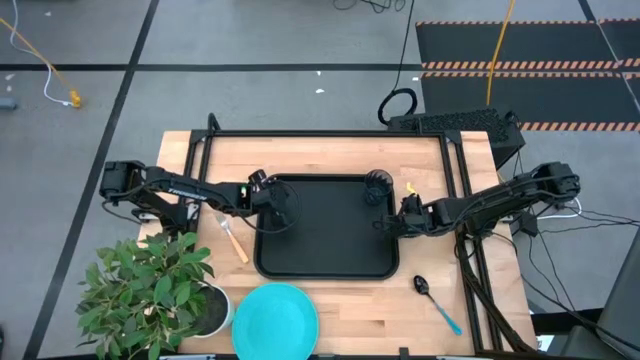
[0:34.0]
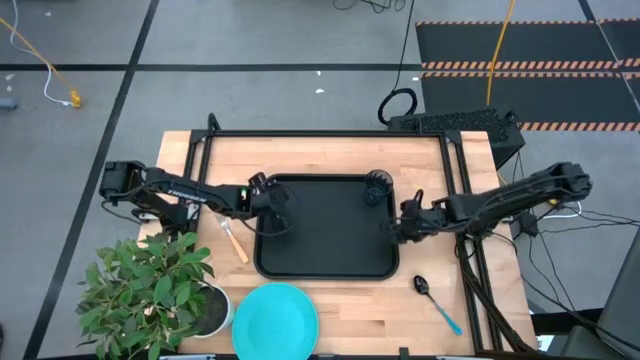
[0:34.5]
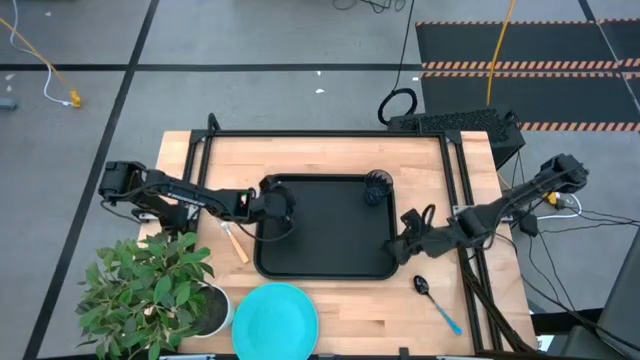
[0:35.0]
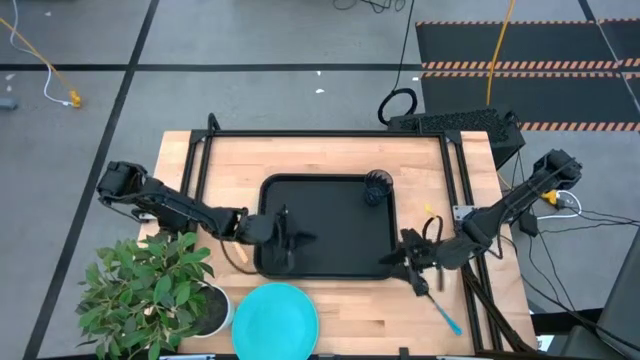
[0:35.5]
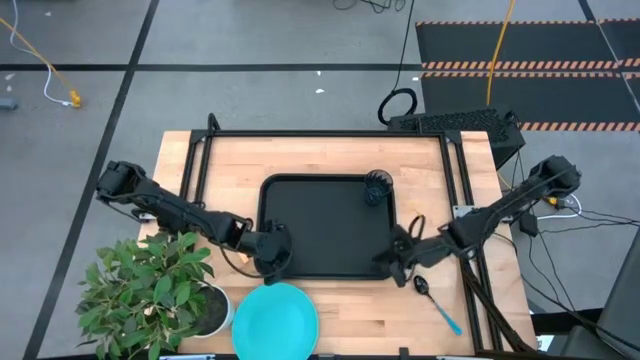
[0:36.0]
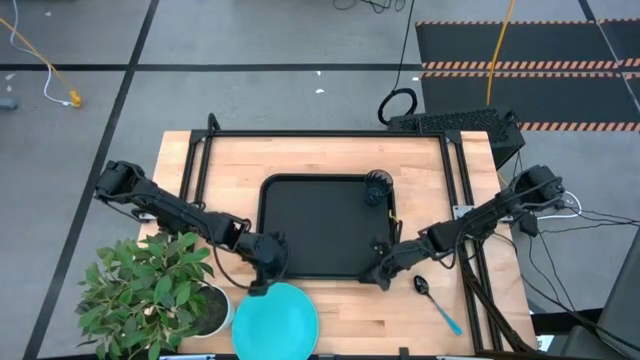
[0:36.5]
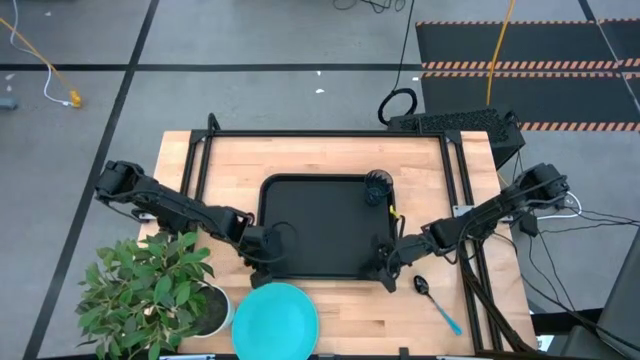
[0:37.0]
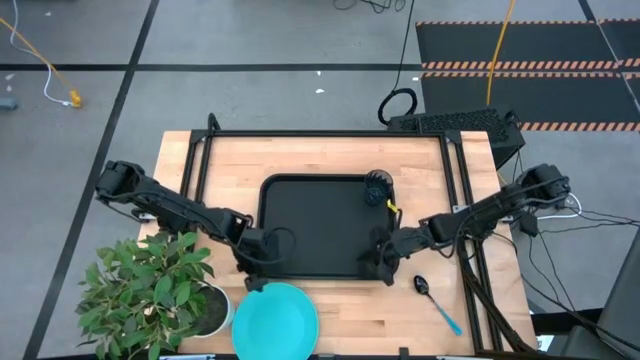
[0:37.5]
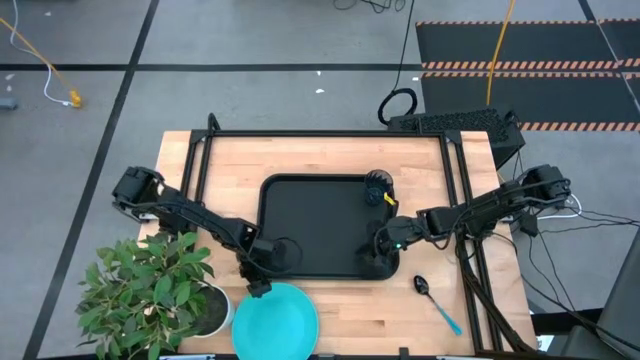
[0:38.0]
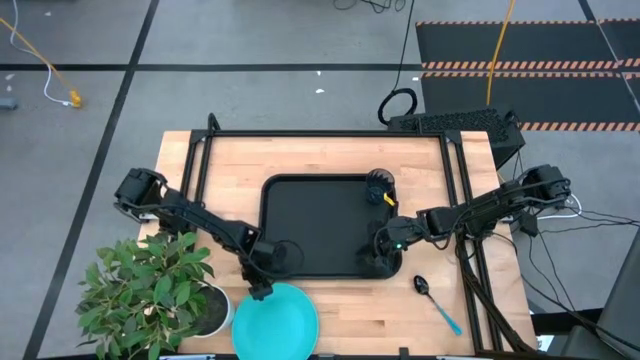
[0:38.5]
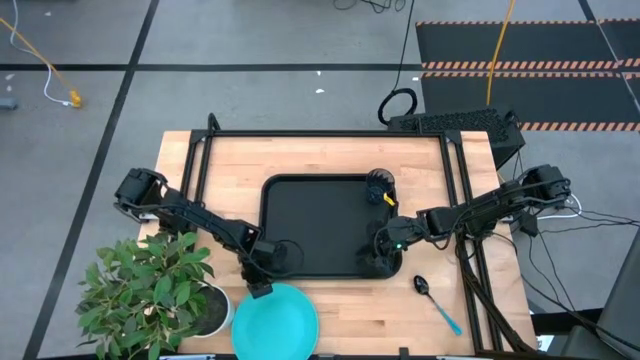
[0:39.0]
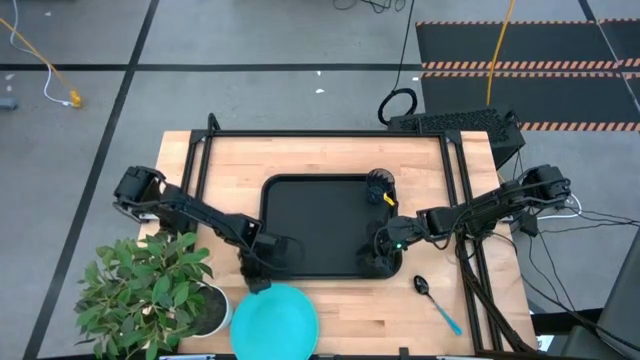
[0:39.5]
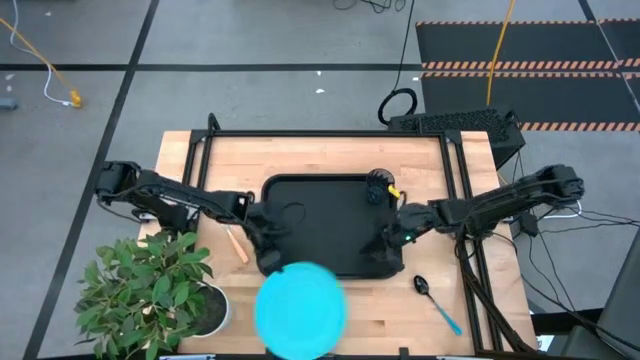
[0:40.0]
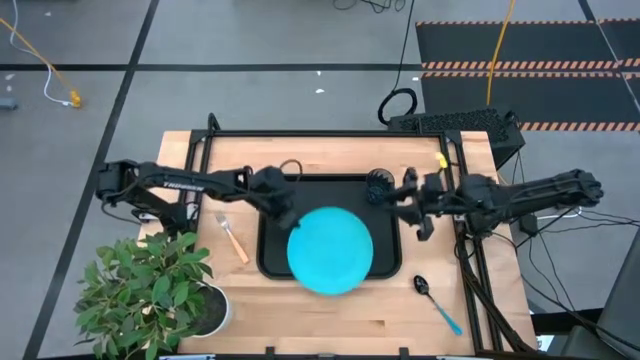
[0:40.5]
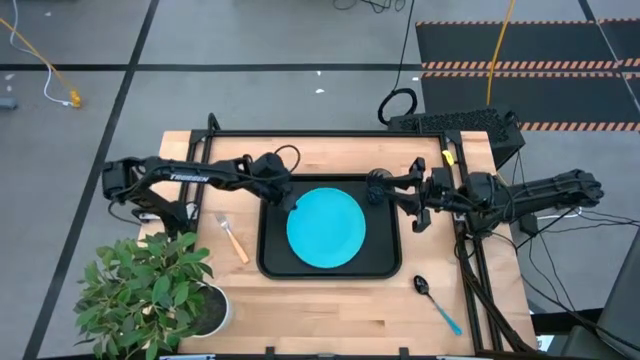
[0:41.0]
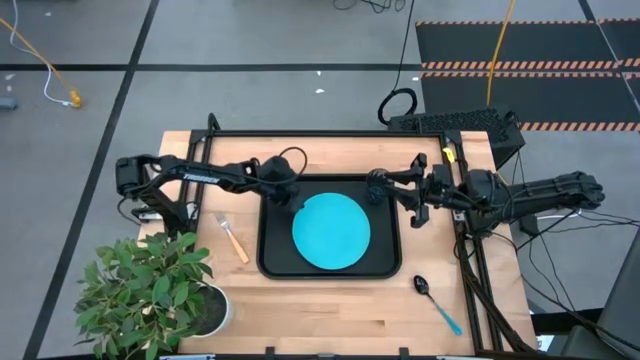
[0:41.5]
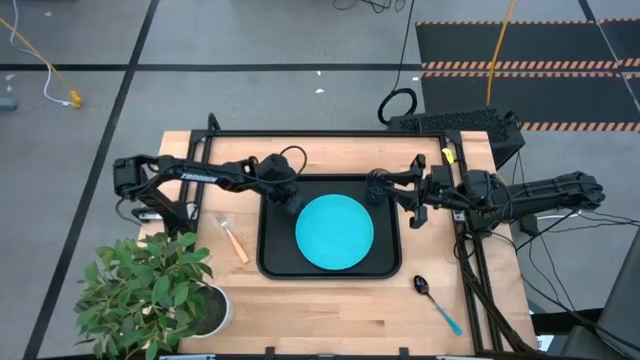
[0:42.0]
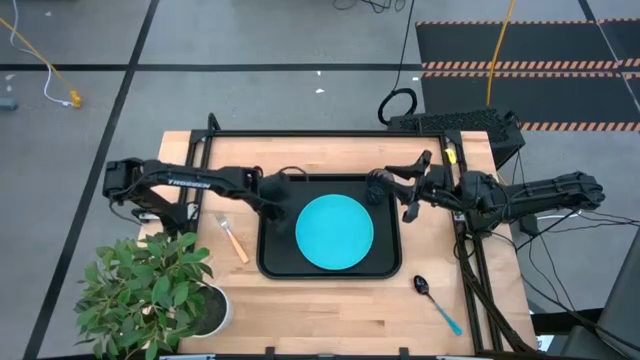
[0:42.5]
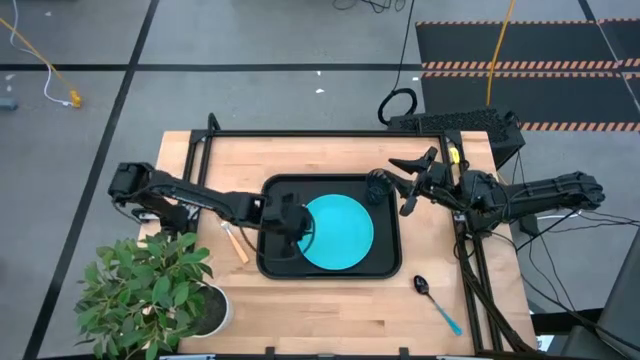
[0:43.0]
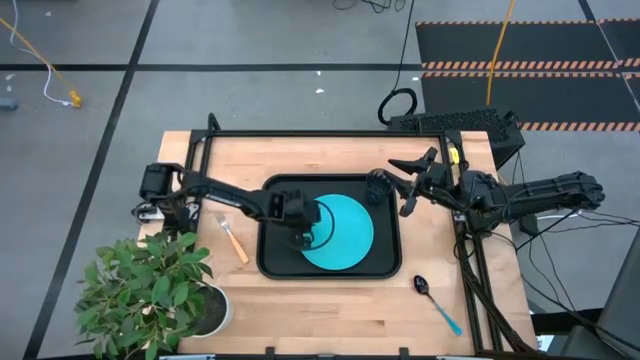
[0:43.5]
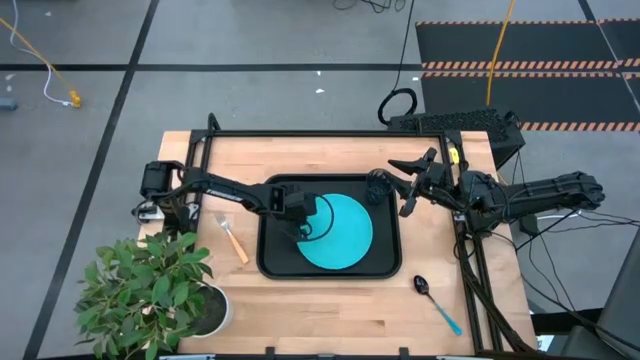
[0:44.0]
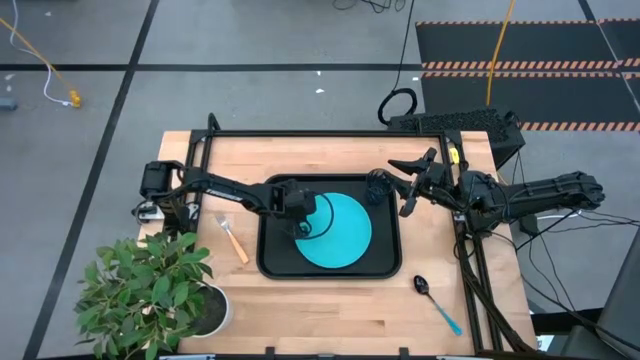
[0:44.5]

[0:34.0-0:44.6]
Task: Pick and place plate/cup/fork/spoon on tray
Put the light blue plate on the black serving tray to the bottom left of the blue cup

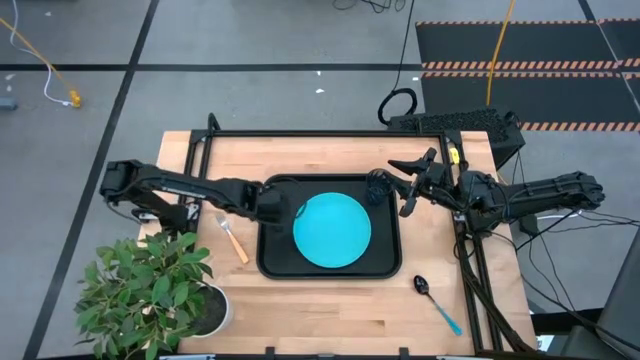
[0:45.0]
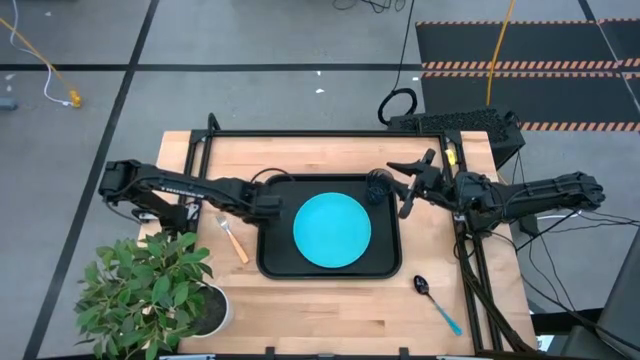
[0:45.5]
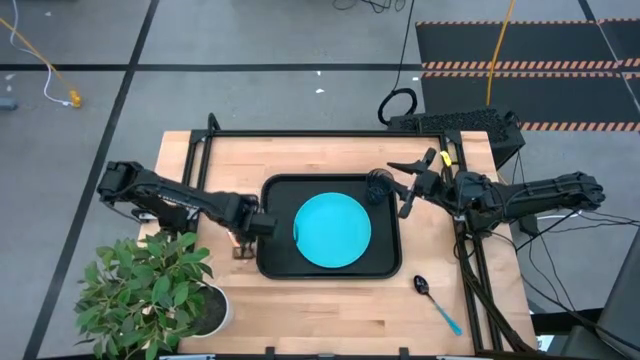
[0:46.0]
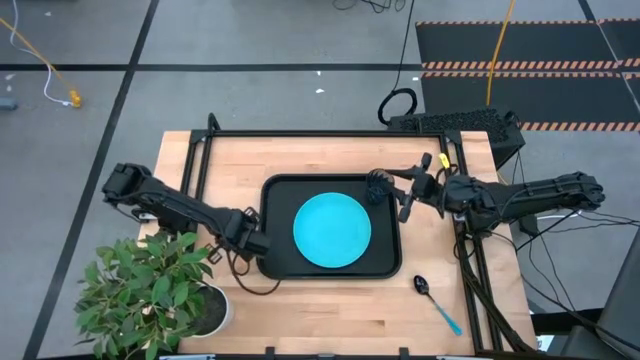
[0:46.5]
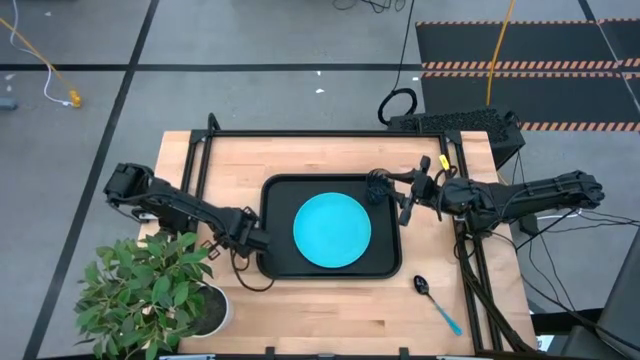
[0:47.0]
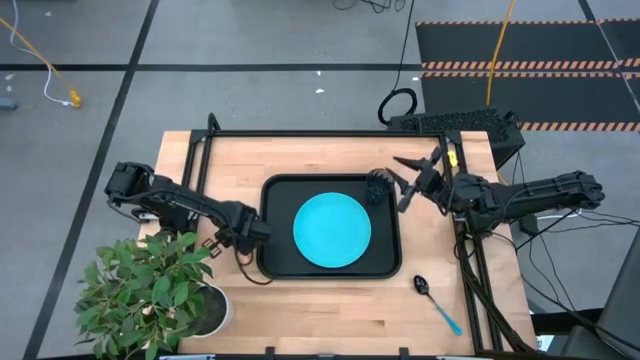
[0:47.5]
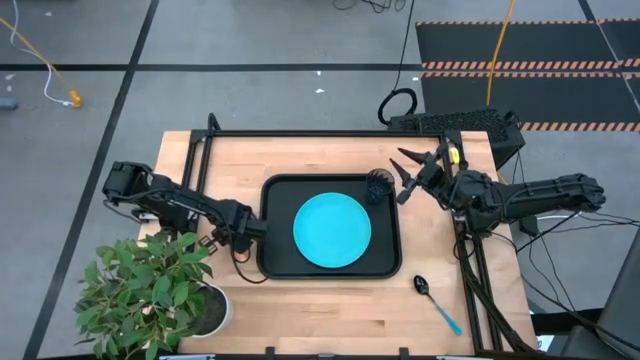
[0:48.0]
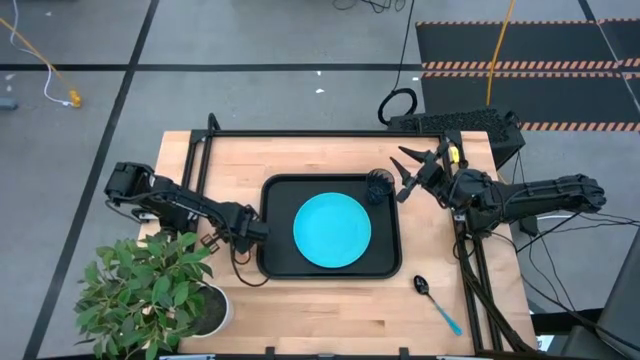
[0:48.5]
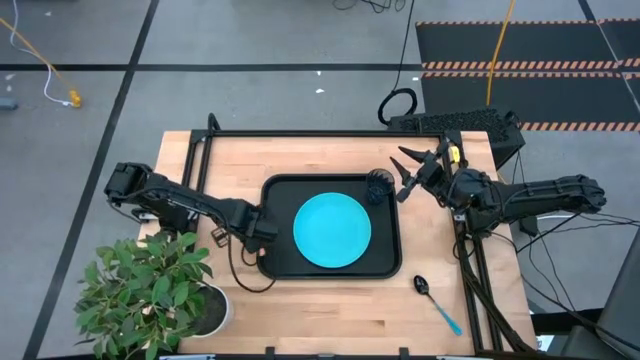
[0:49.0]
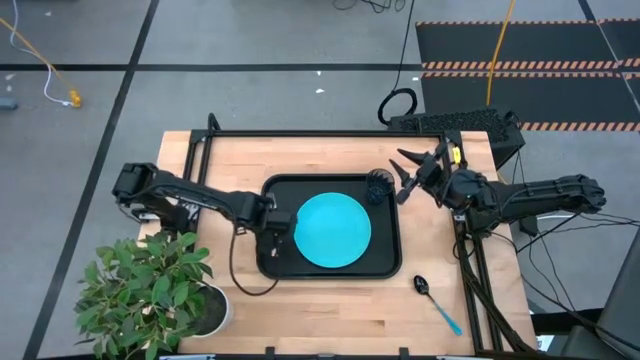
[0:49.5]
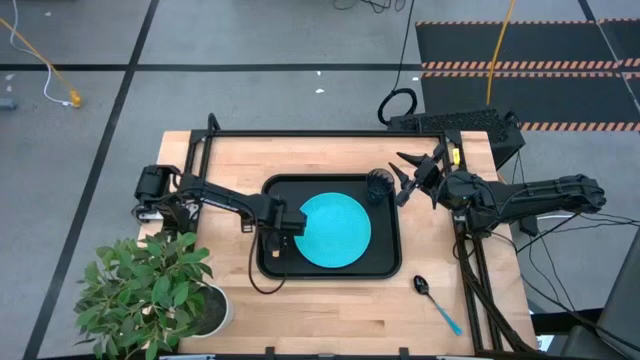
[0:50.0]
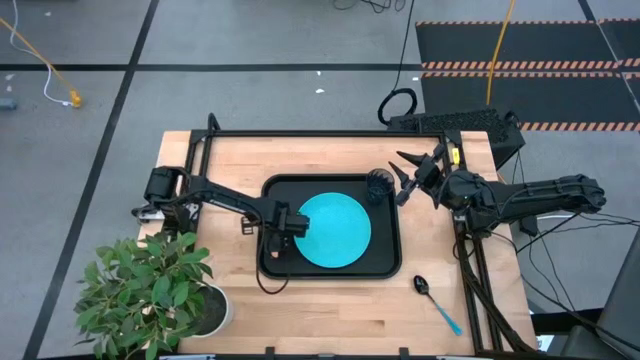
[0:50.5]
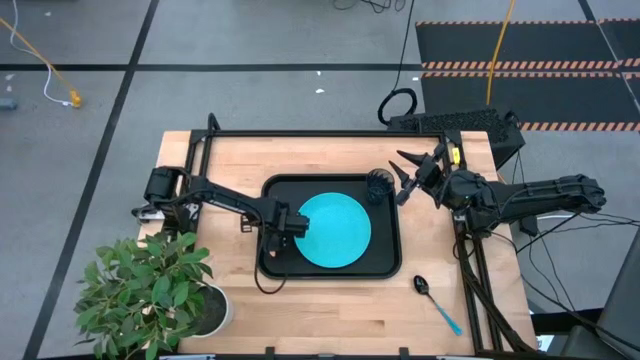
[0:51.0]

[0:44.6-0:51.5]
Put the orange fork on the black serving tray to the left of the light blue plate

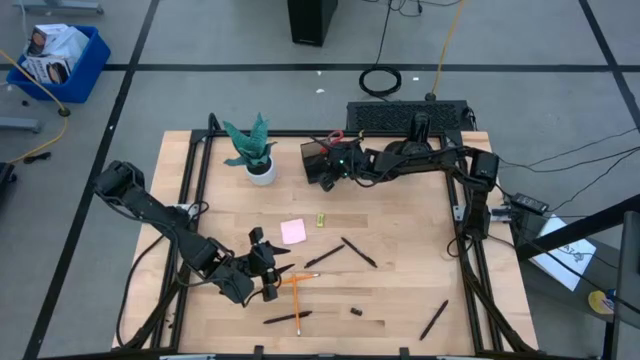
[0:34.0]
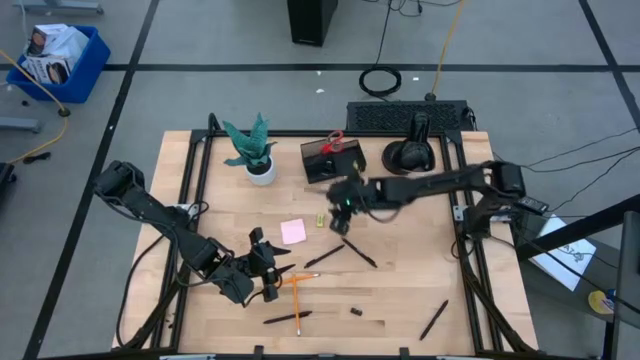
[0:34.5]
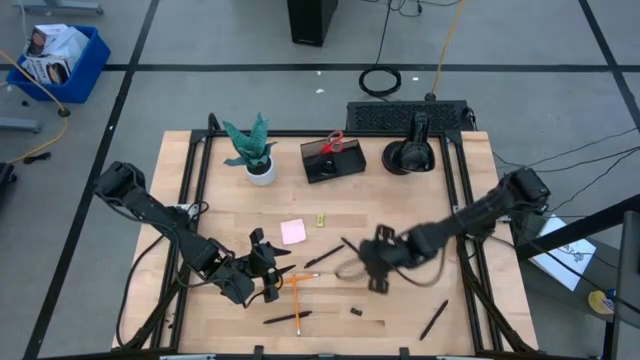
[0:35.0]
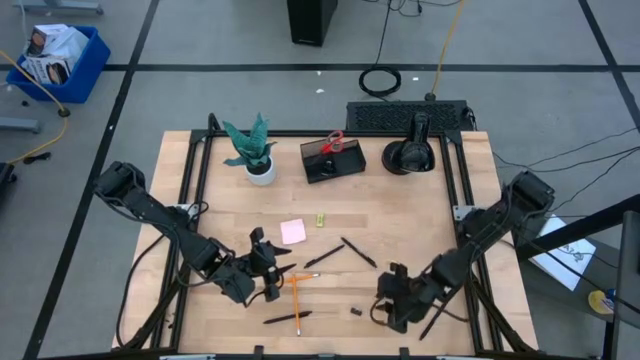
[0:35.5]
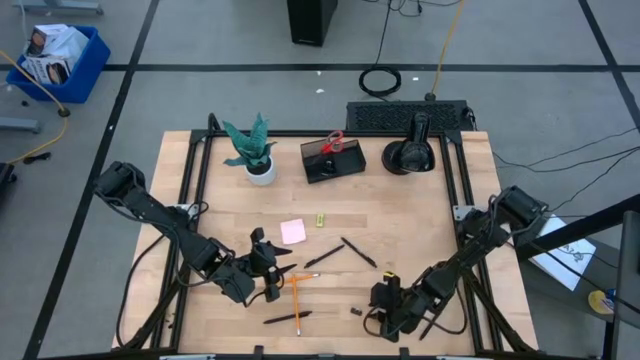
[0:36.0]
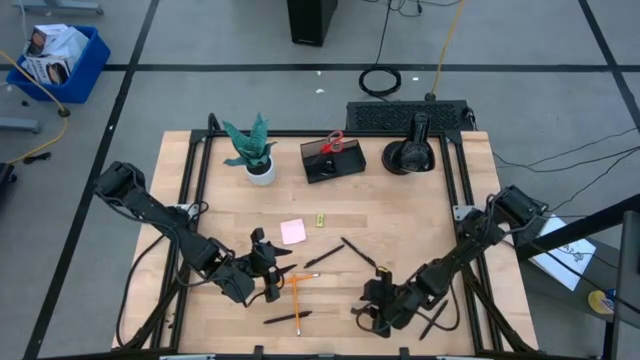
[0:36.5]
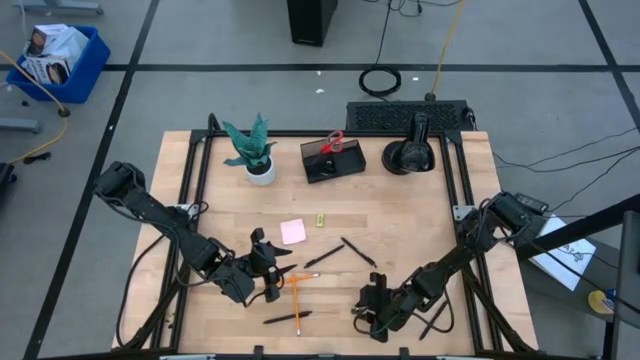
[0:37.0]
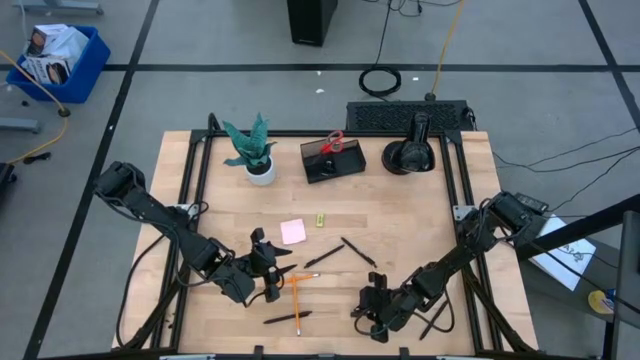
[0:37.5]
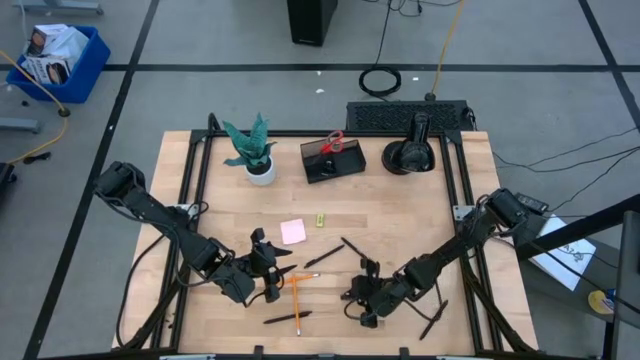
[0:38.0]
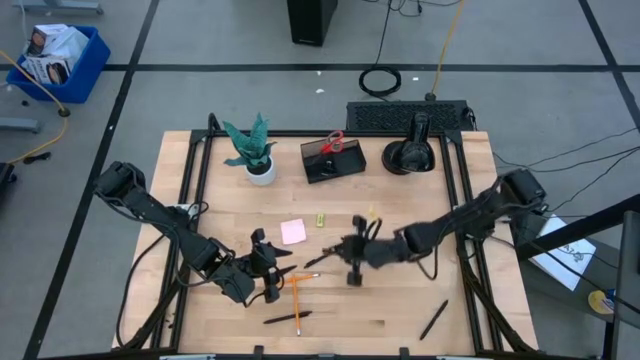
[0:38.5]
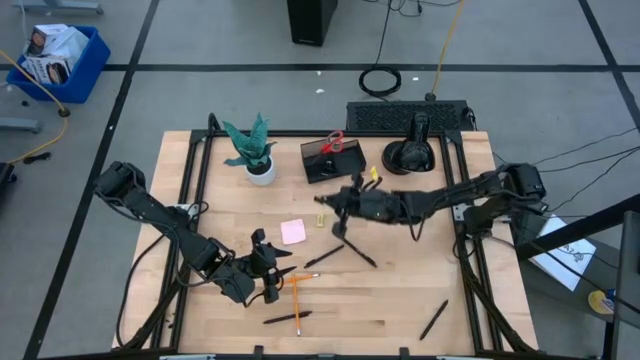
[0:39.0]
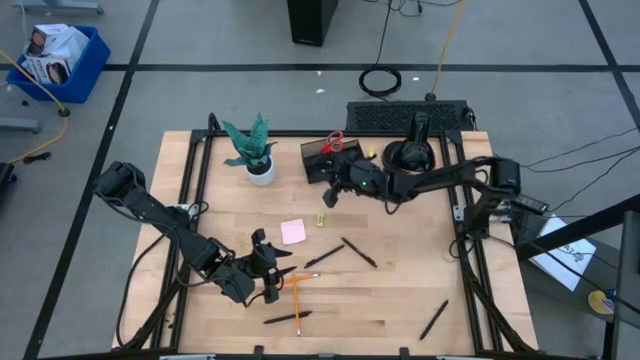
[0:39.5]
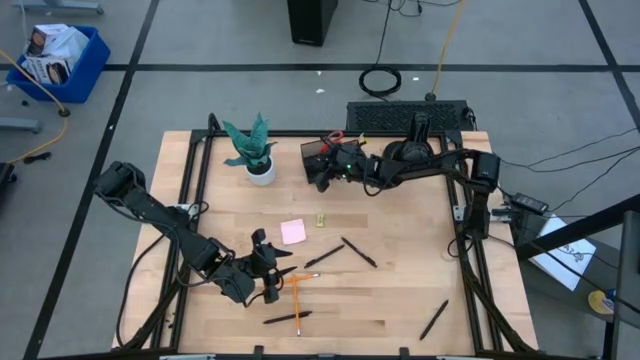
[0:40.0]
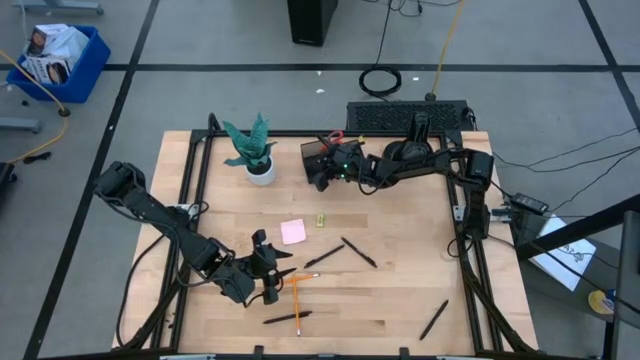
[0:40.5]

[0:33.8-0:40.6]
Task: Pick and place office supplies into organizer
Put the black binder clip into the black black mesh desk organizer
